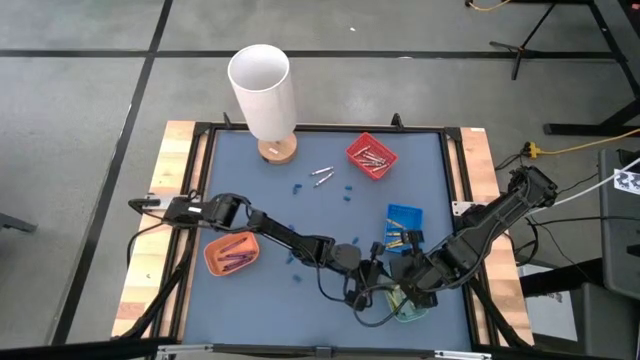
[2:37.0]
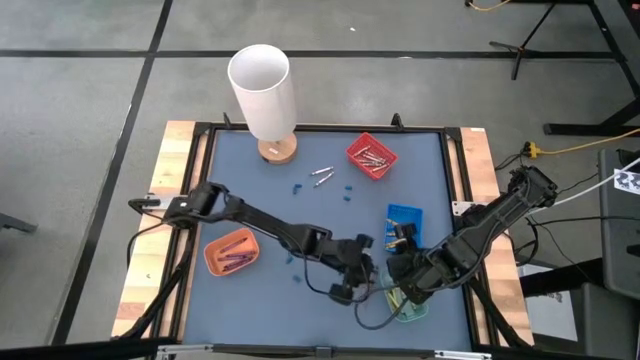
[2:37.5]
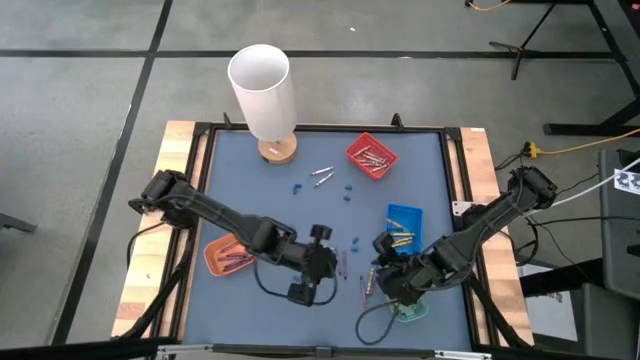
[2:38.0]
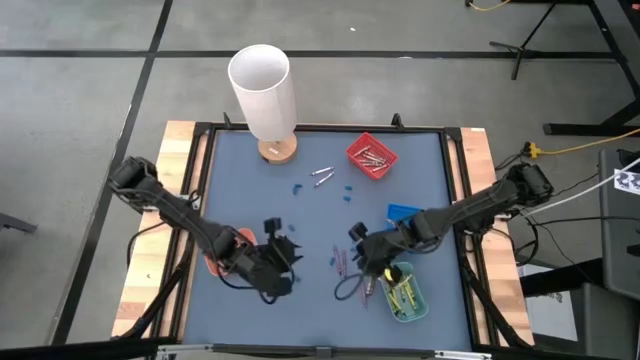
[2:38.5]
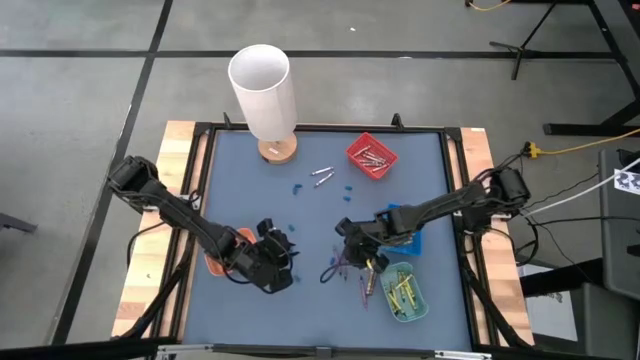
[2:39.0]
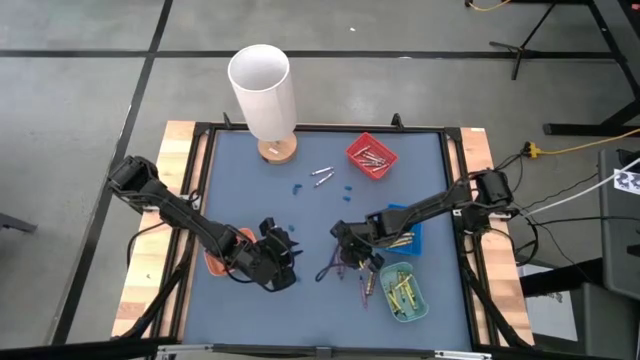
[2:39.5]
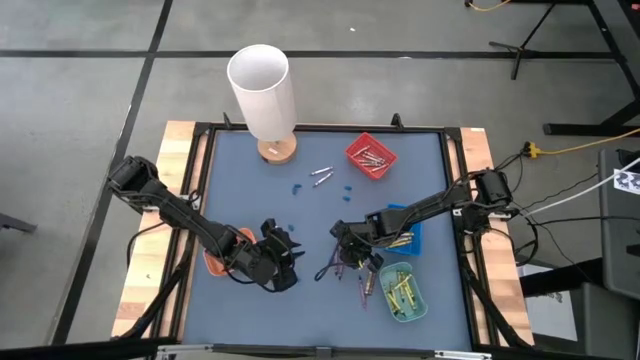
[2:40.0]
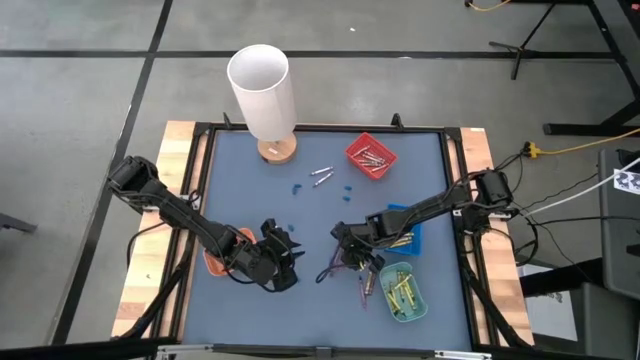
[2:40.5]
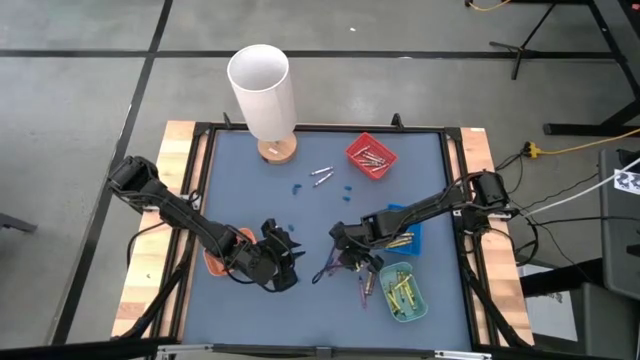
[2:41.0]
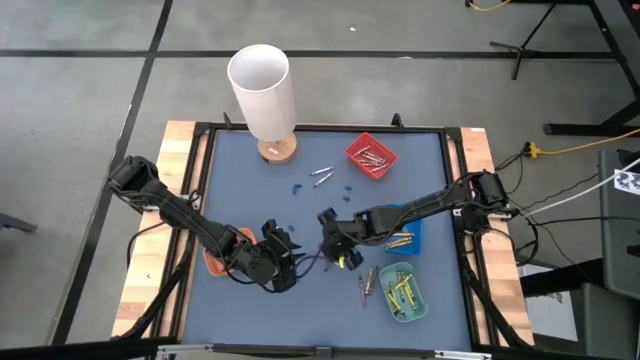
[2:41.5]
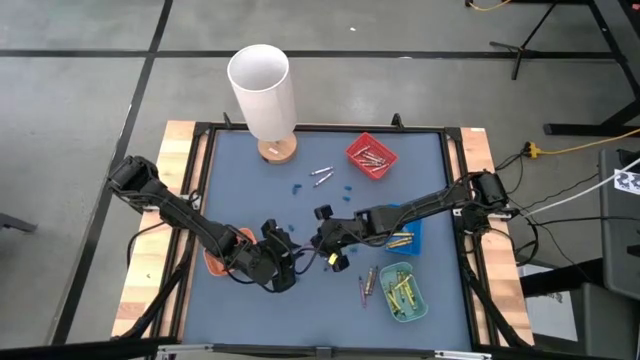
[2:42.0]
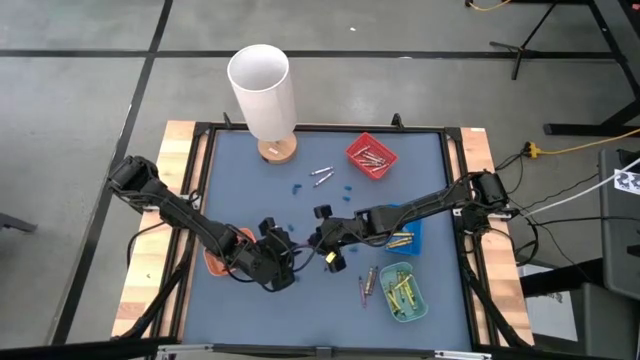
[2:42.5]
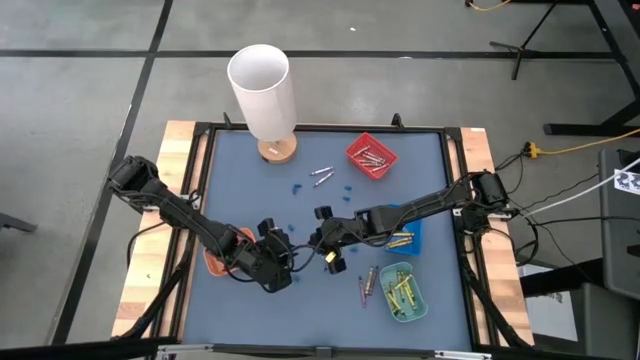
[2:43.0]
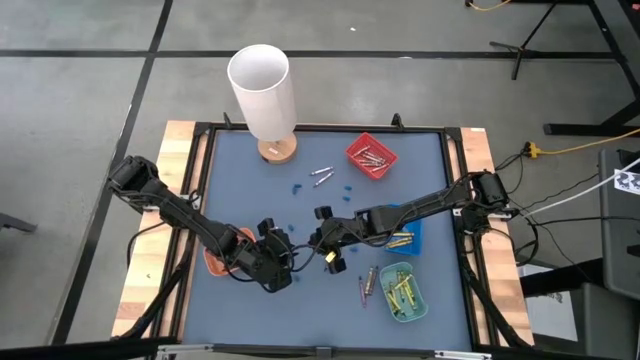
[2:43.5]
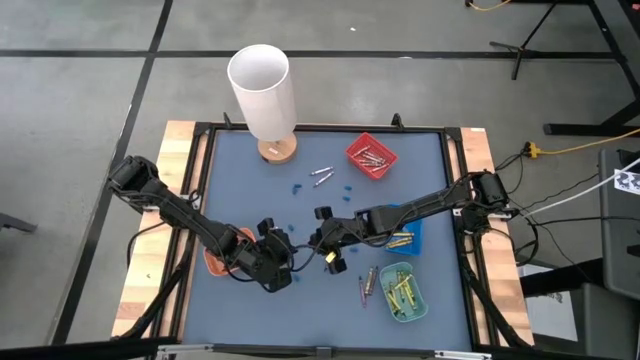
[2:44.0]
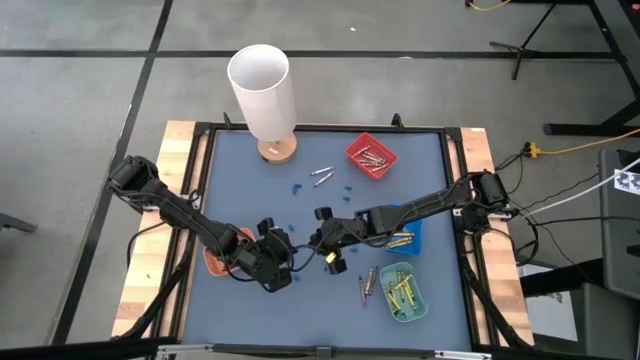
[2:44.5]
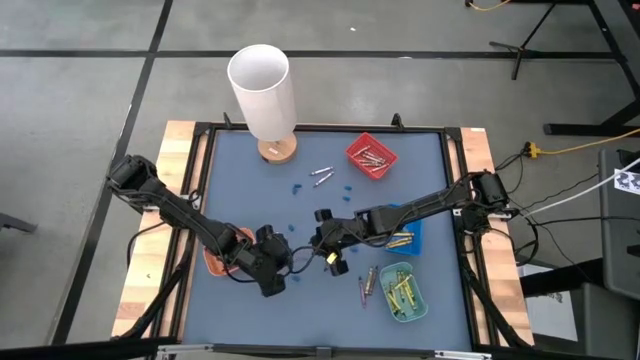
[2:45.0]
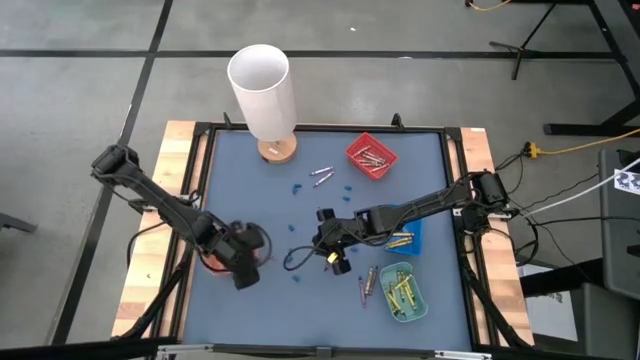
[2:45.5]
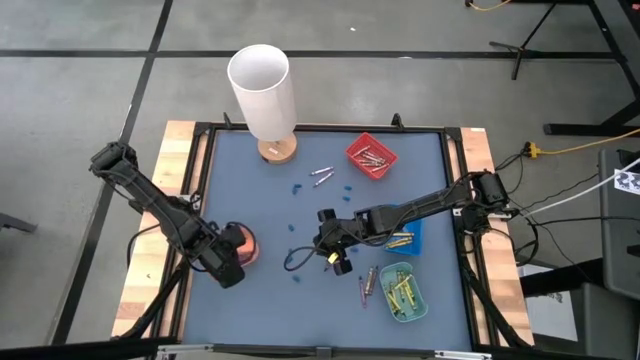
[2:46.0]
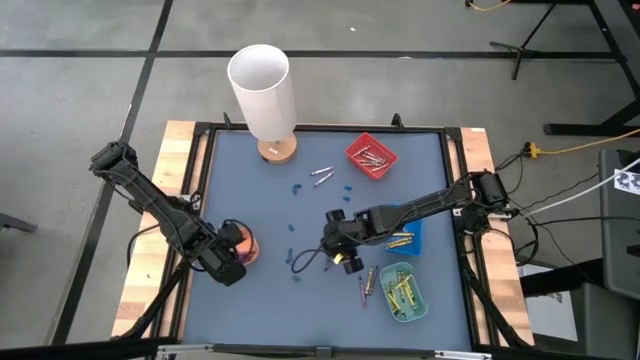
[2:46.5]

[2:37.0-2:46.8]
Task: Sort crayons
Put the violet crayon into the orange bin

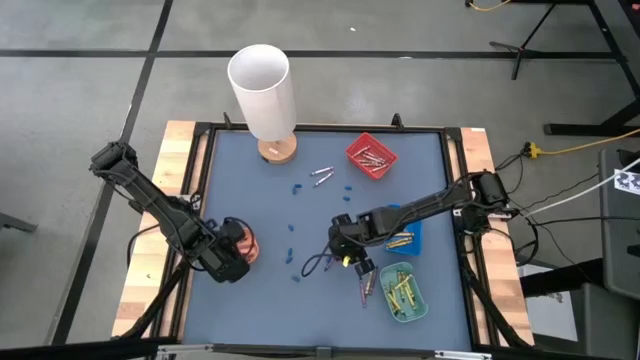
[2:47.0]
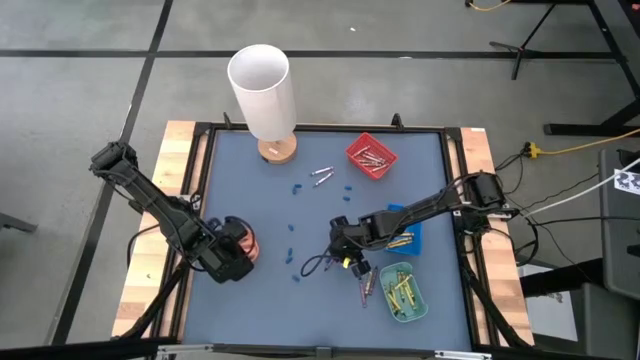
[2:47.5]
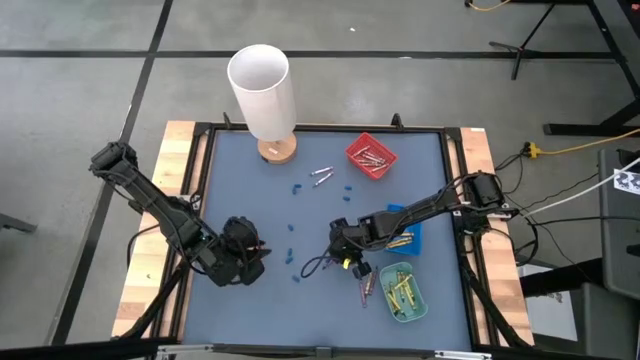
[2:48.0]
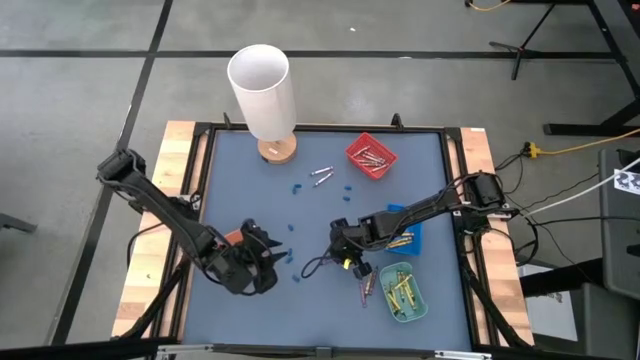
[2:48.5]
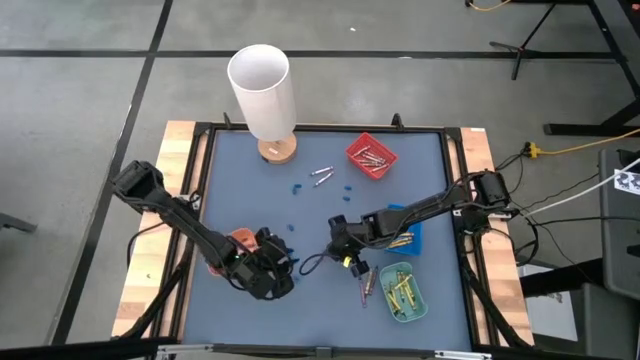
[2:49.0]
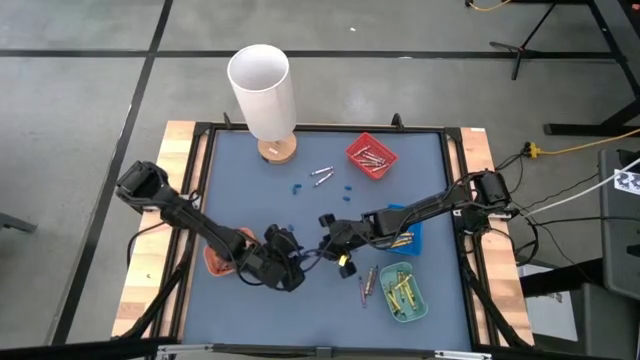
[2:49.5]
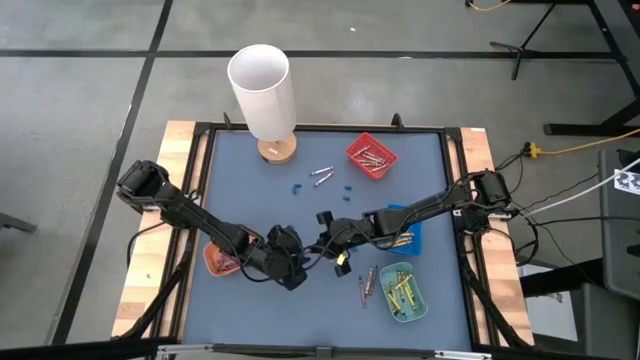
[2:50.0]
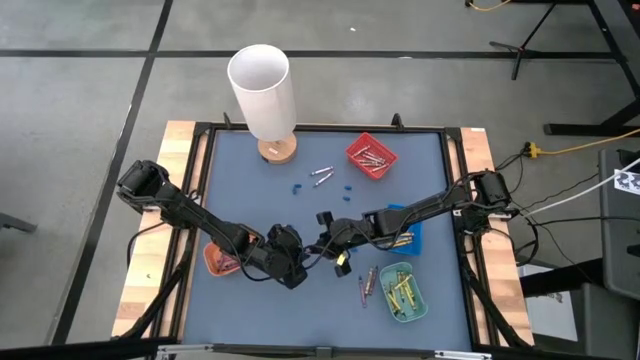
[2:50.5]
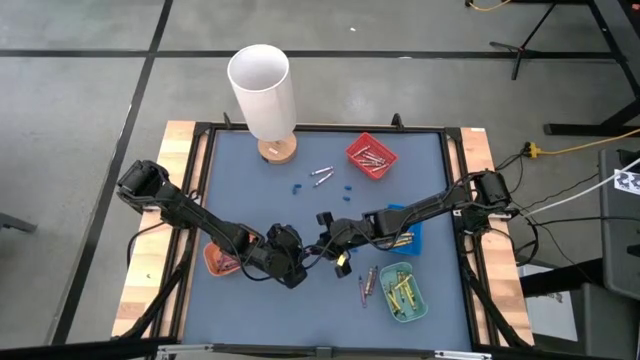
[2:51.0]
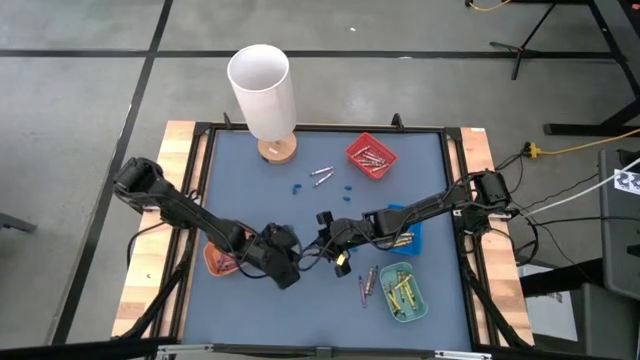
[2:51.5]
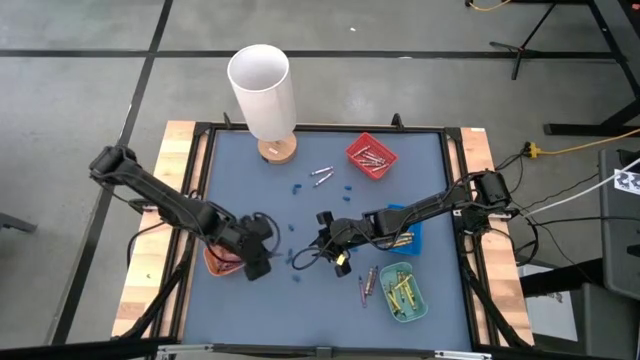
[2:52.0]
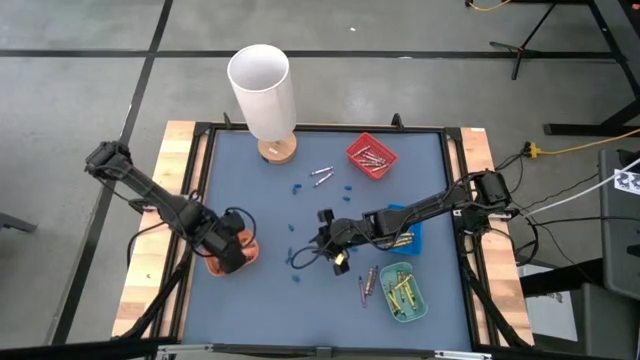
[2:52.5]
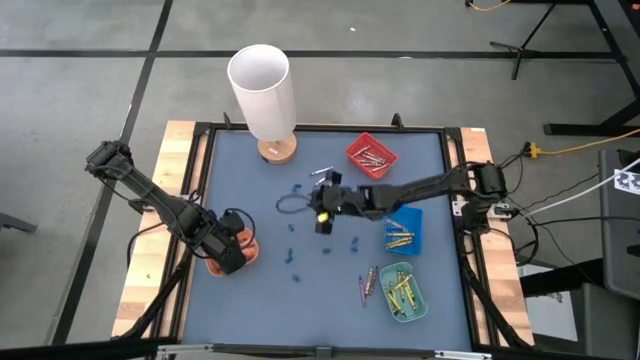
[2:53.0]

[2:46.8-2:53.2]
Put the violet crayon into the orange bin

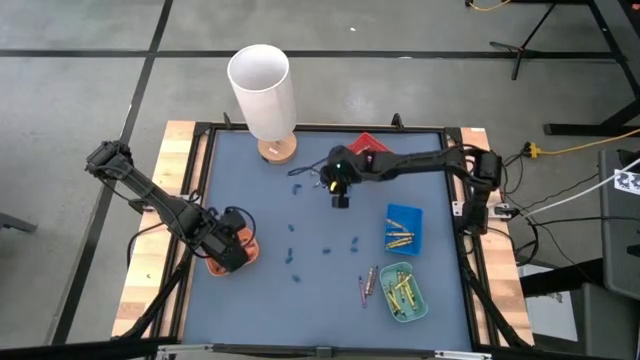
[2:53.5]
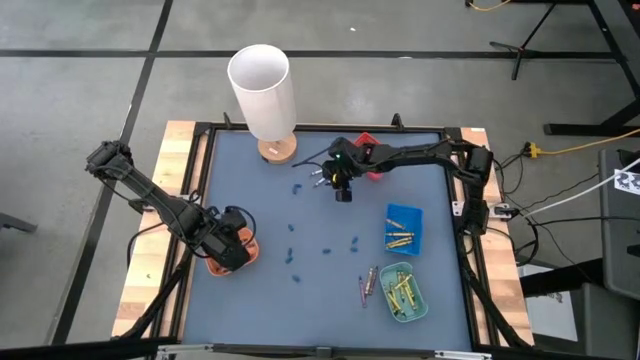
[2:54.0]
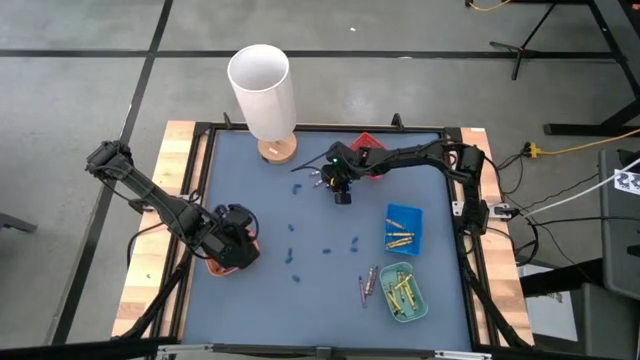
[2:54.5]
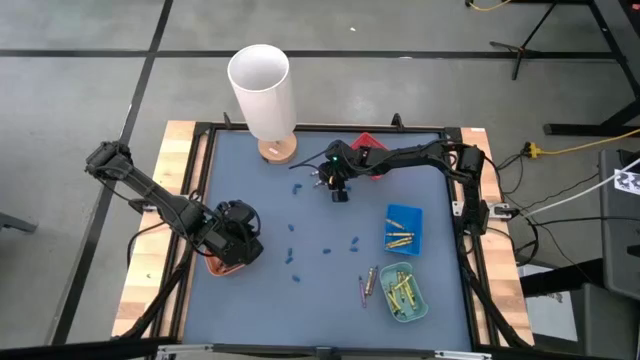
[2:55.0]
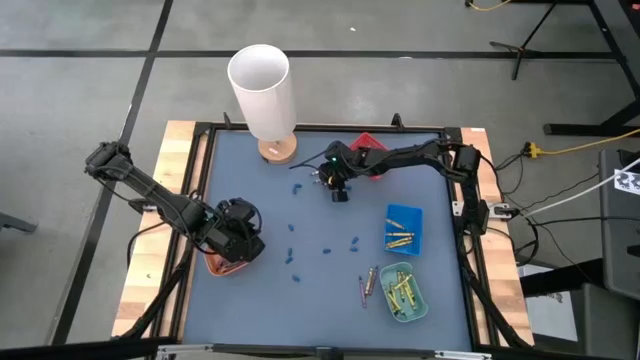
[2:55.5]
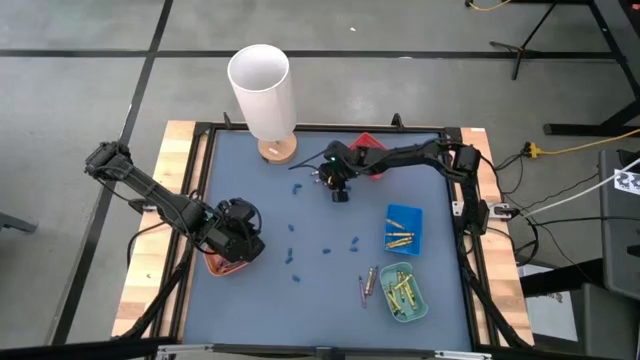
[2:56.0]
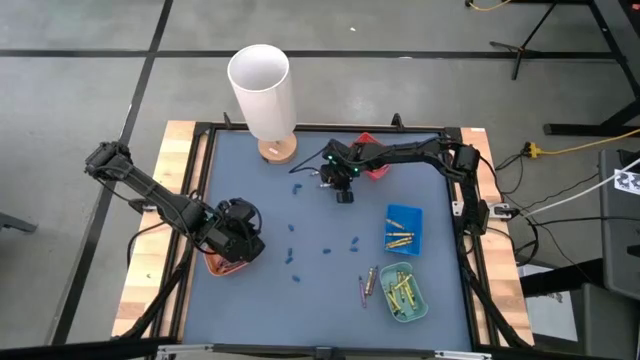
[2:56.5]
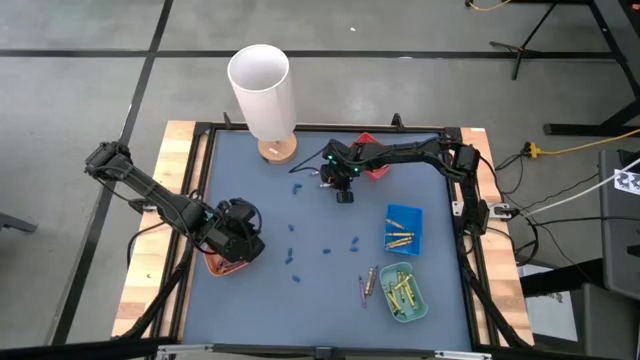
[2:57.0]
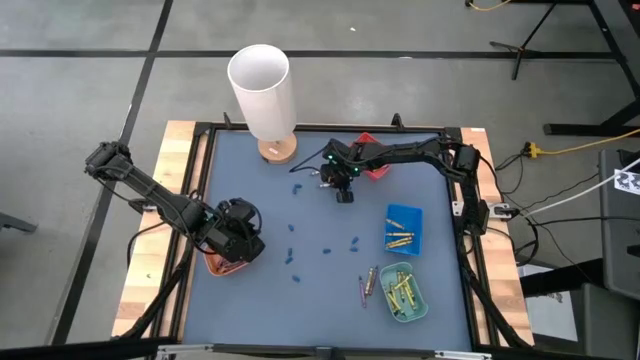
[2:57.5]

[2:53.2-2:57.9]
Put the grey crayon into the red box
